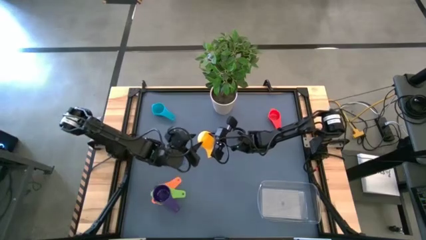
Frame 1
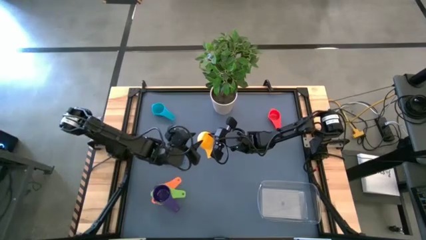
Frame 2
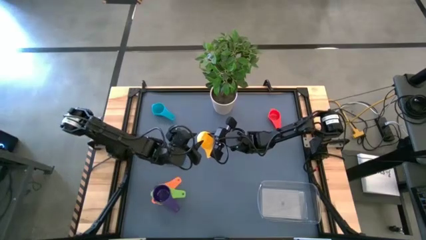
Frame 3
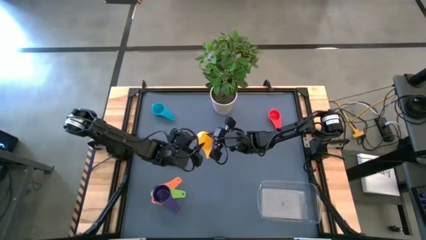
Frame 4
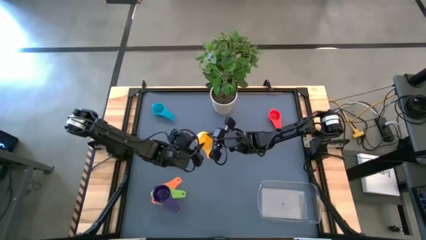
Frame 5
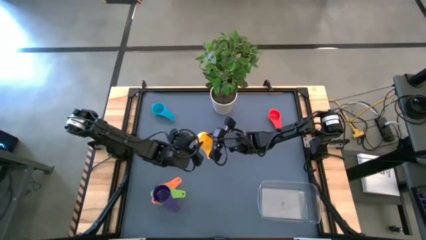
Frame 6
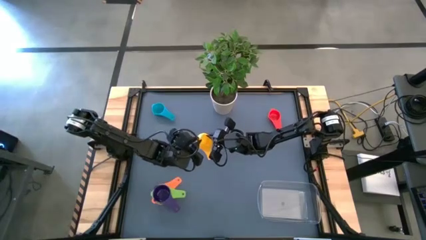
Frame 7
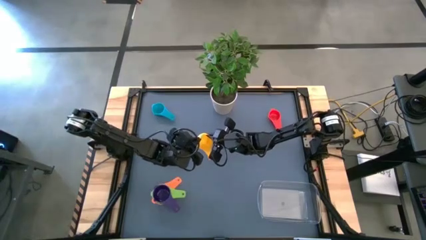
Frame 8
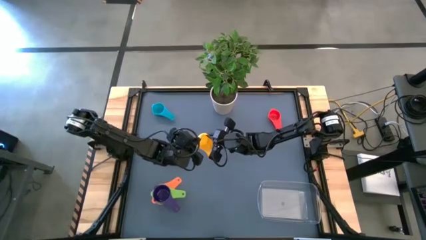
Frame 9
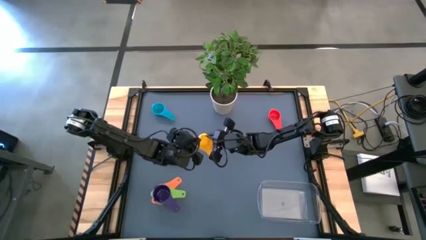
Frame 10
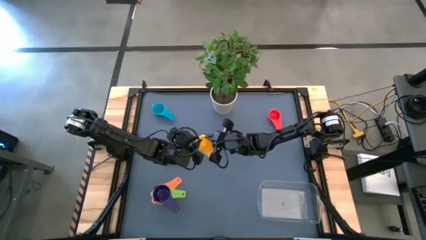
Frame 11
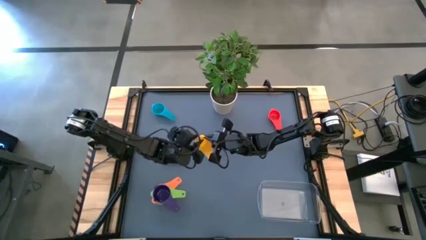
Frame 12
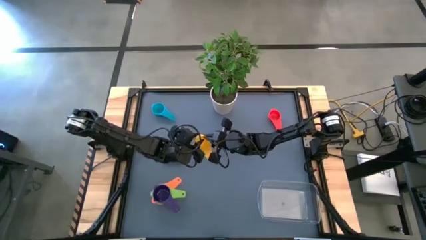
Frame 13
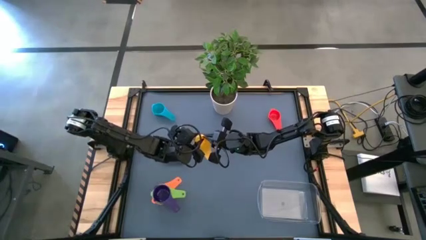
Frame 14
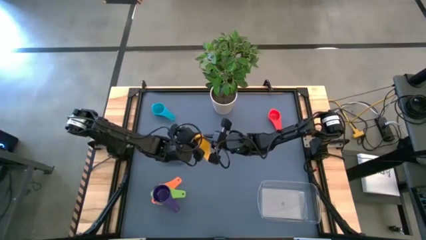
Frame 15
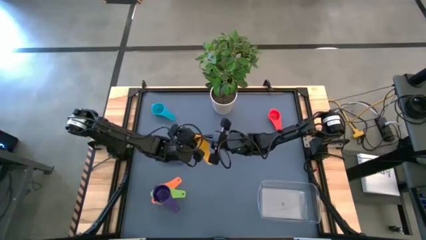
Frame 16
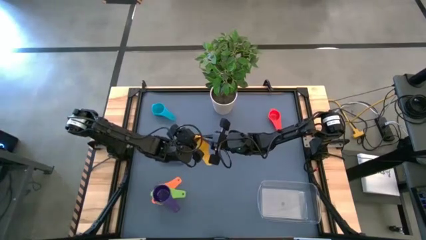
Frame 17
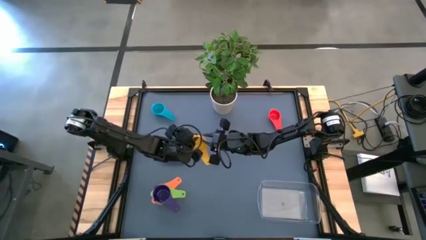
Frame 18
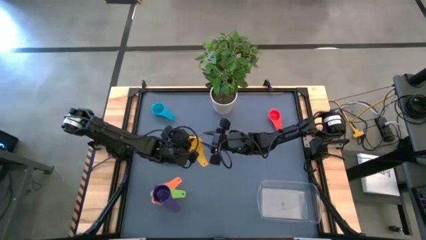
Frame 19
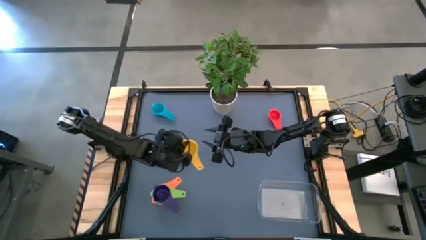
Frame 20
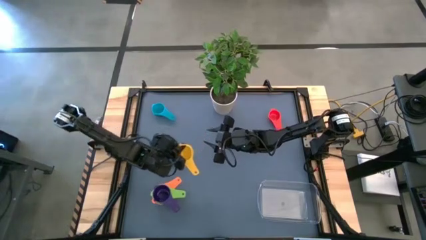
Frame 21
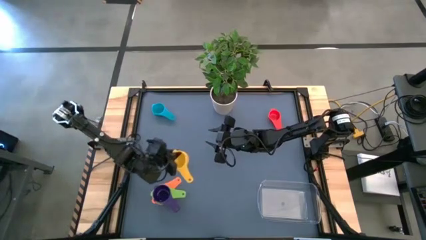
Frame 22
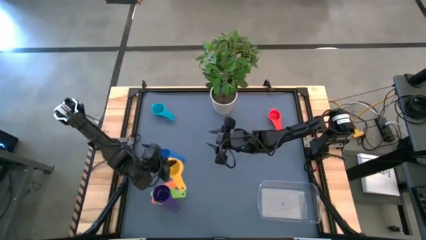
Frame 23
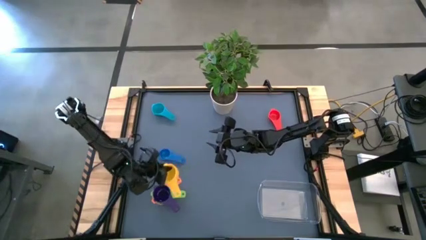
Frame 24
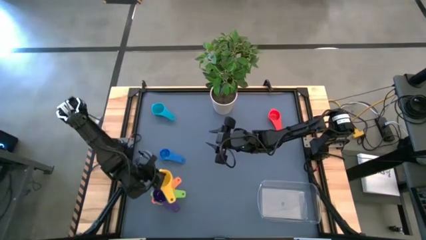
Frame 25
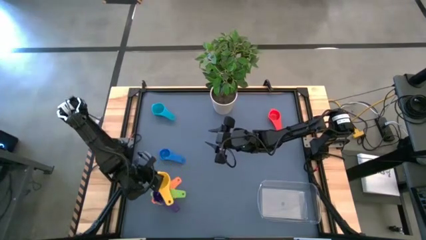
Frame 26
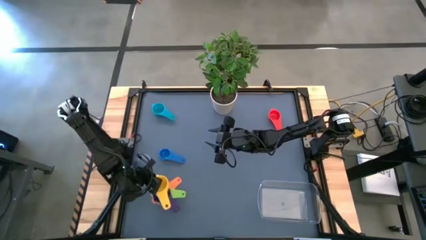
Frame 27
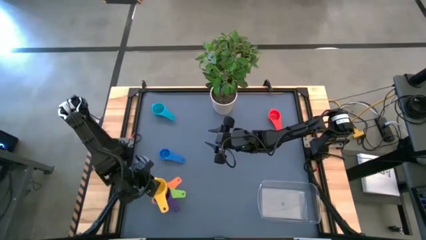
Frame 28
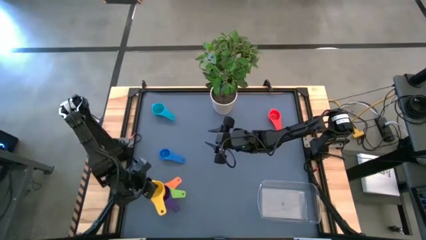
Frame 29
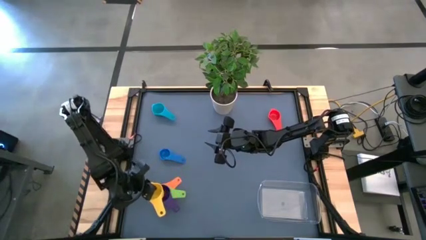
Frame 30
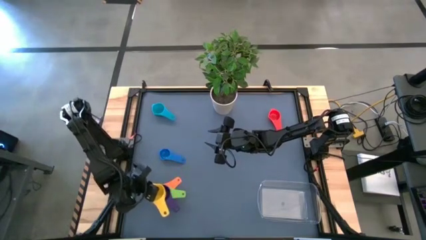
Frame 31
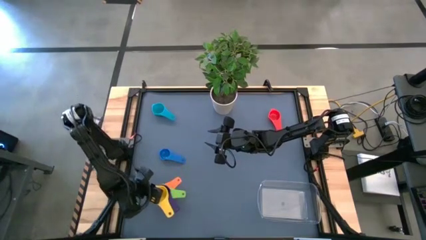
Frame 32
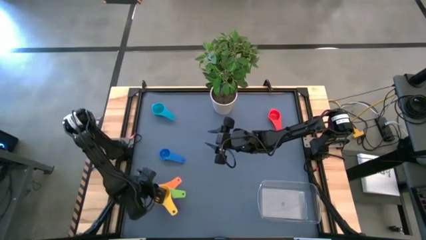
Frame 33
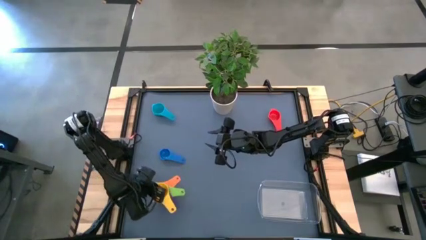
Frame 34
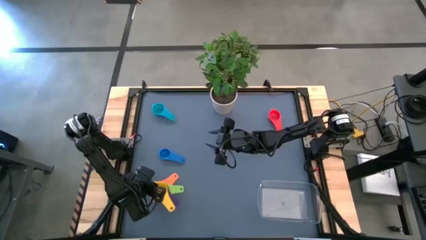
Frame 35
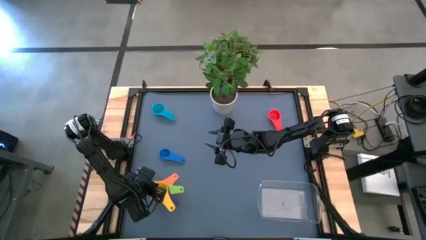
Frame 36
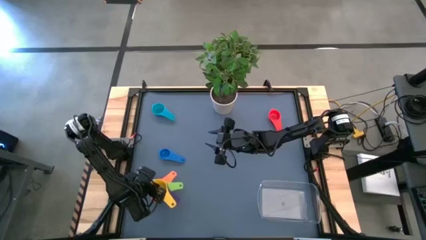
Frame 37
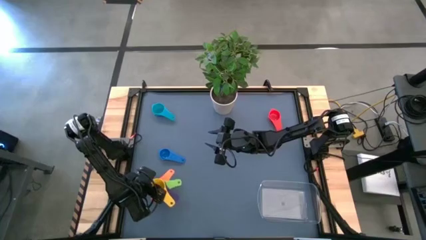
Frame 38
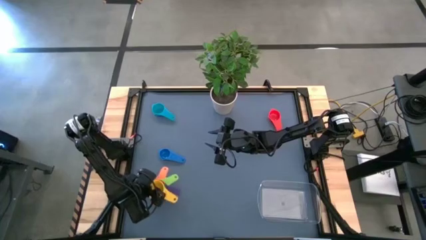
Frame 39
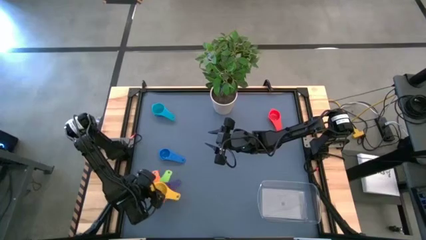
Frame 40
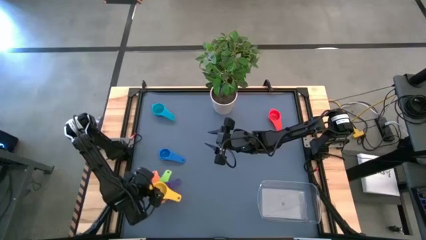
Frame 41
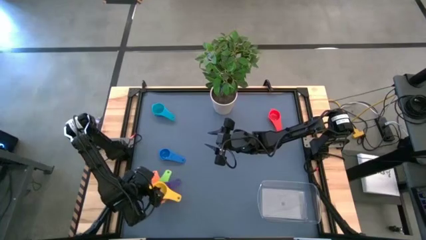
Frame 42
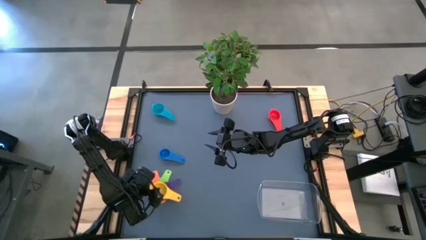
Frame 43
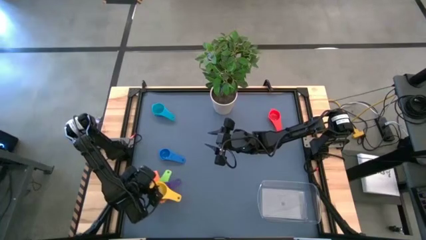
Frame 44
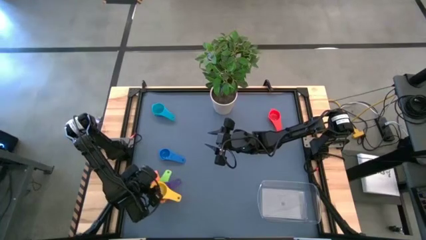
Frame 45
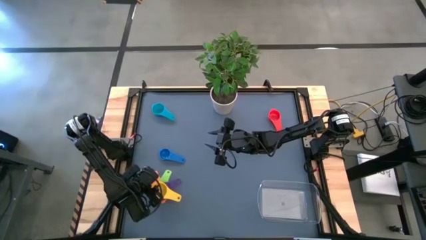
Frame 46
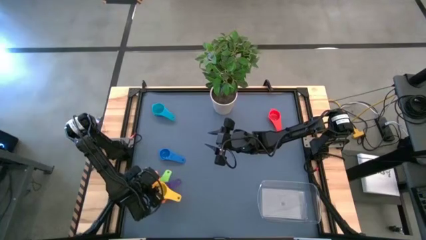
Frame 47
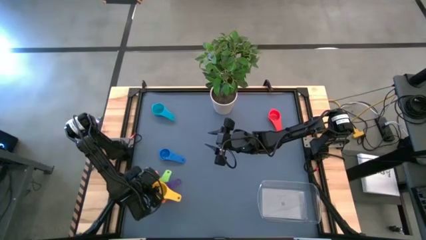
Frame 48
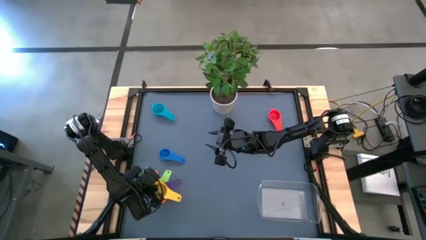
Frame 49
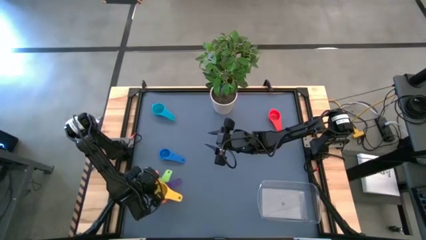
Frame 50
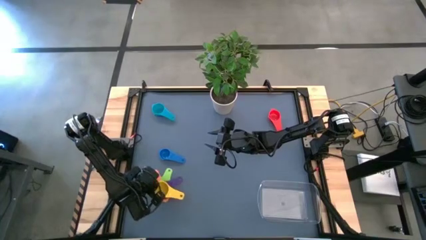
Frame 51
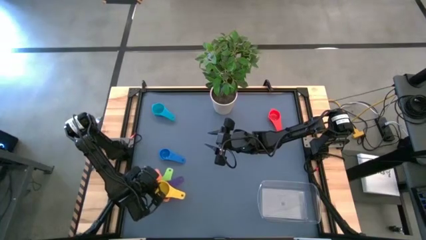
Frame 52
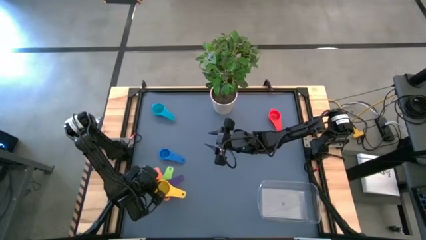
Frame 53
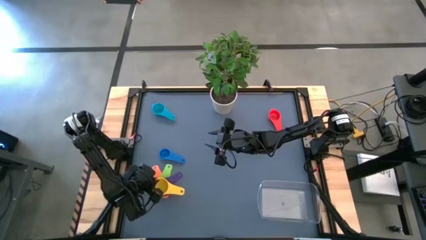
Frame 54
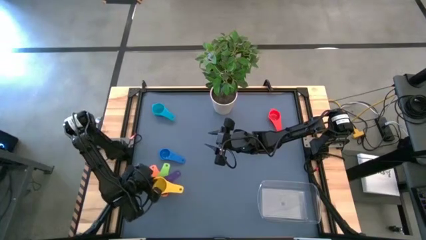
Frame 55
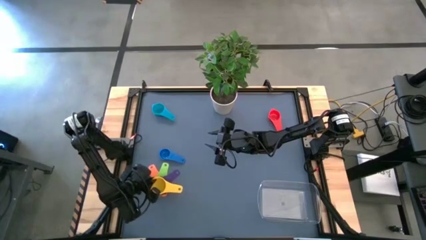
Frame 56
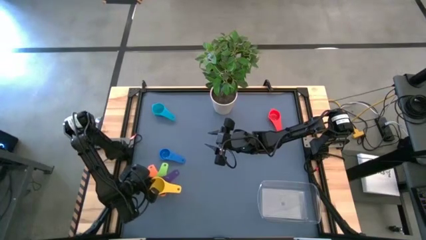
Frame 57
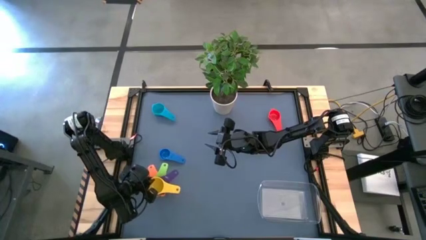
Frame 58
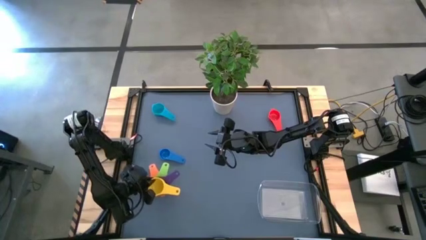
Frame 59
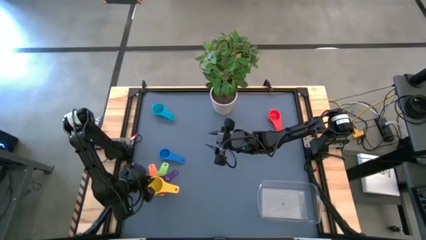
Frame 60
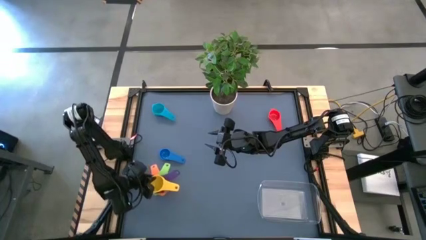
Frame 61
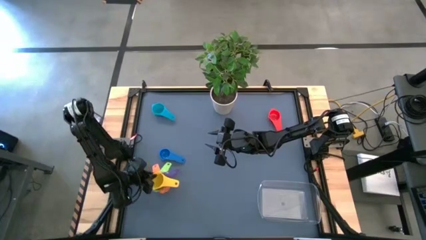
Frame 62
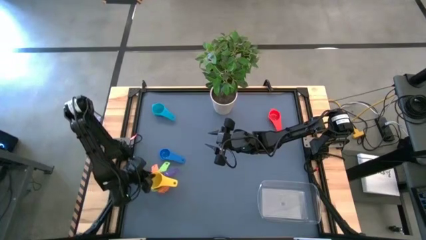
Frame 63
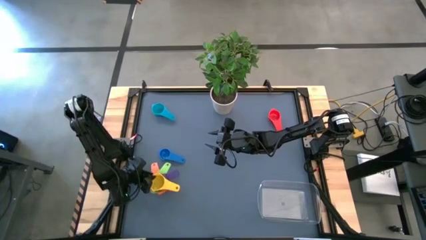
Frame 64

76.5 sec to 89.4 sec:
Task: Nest measuring cups in basket
Stack the yellow measuring cup on top of the violet measuring cup
